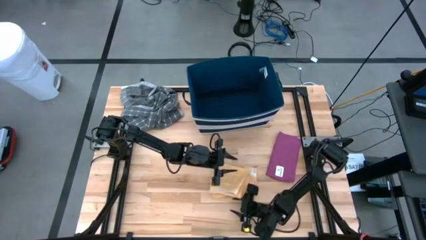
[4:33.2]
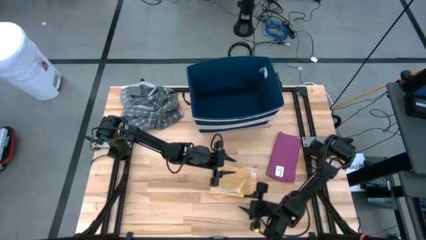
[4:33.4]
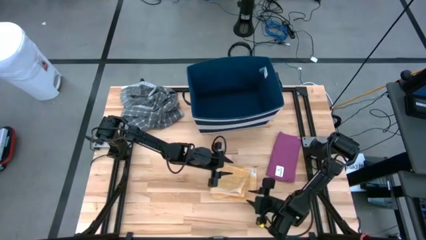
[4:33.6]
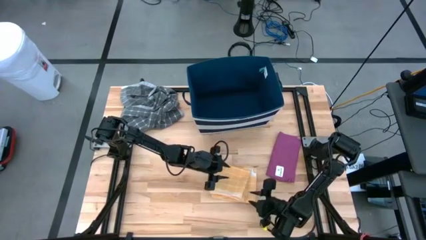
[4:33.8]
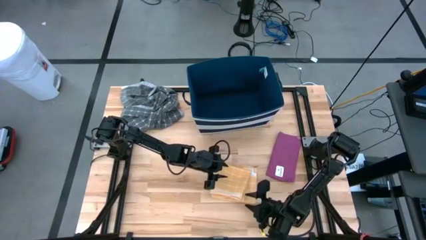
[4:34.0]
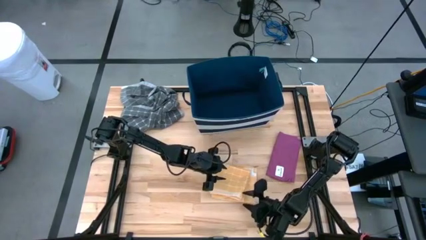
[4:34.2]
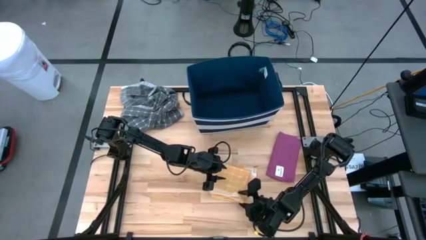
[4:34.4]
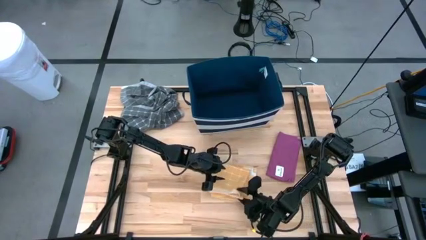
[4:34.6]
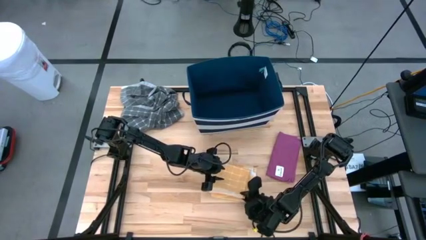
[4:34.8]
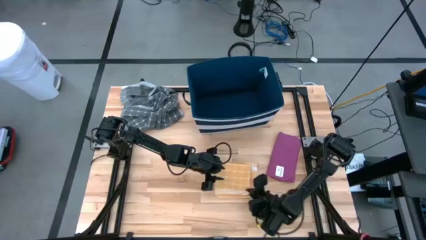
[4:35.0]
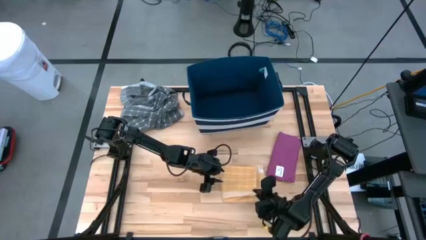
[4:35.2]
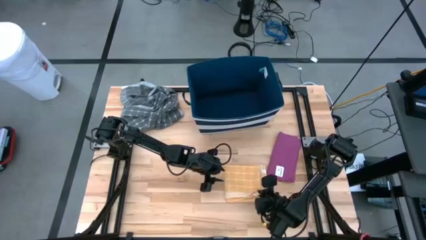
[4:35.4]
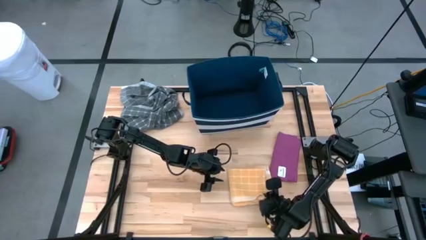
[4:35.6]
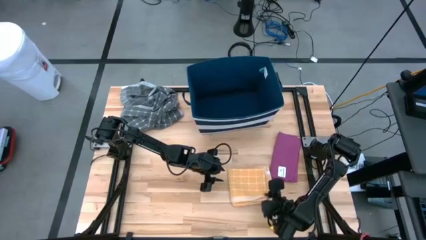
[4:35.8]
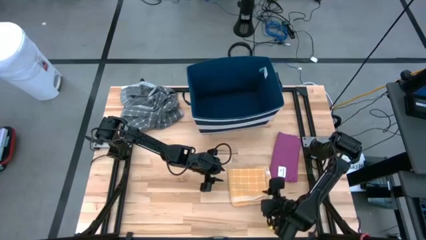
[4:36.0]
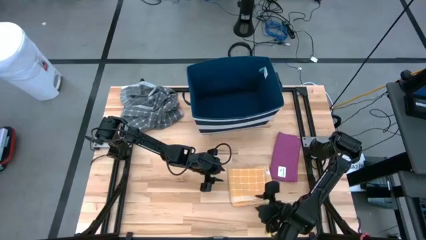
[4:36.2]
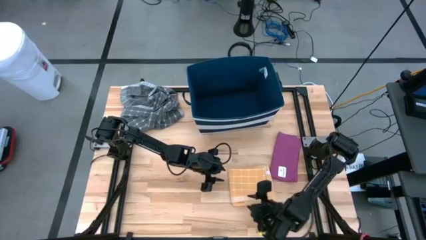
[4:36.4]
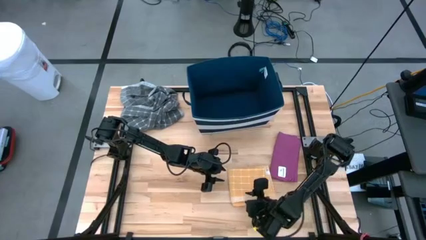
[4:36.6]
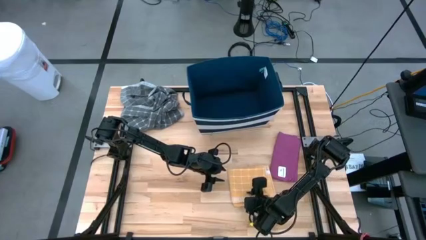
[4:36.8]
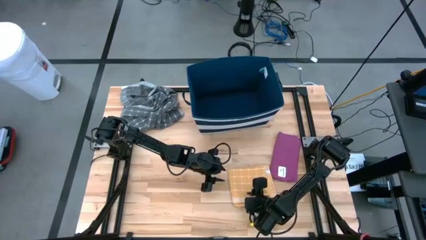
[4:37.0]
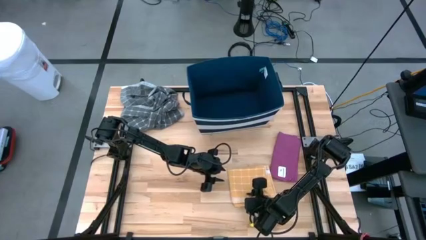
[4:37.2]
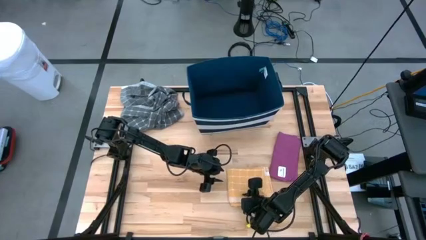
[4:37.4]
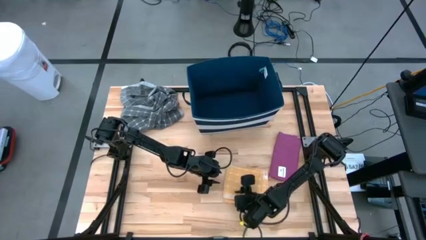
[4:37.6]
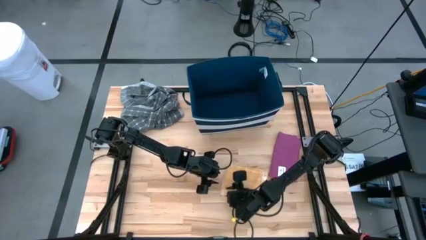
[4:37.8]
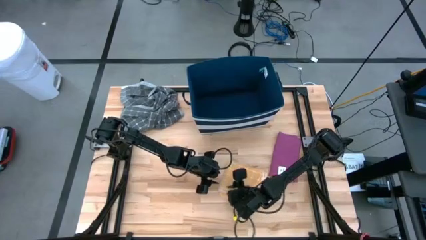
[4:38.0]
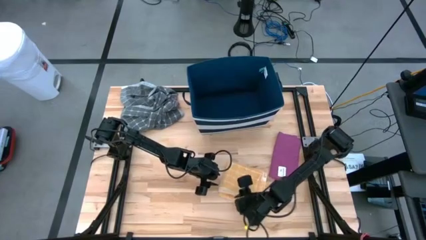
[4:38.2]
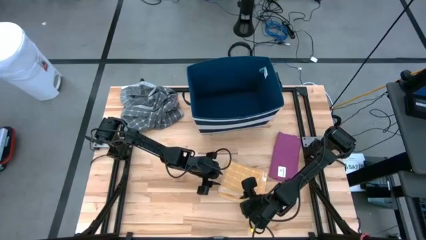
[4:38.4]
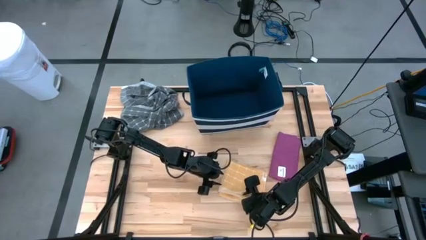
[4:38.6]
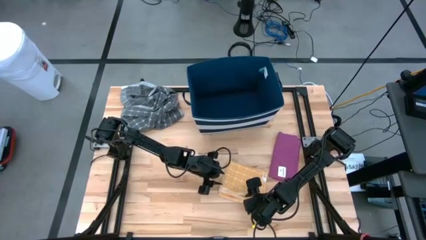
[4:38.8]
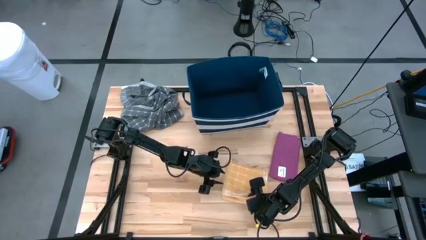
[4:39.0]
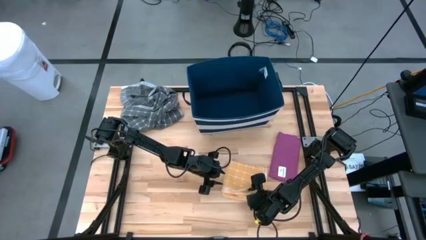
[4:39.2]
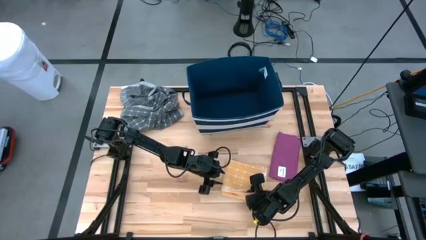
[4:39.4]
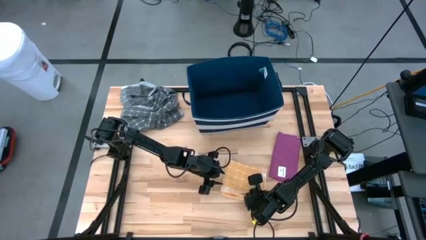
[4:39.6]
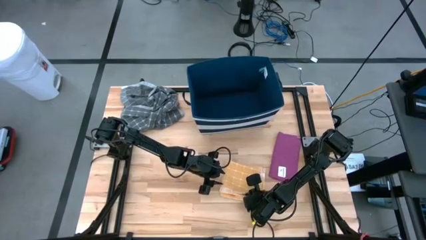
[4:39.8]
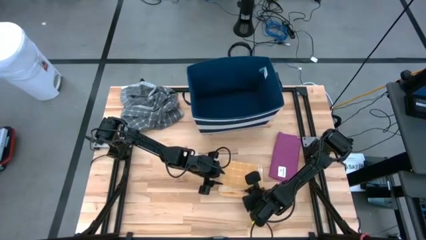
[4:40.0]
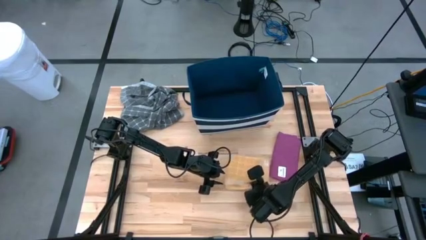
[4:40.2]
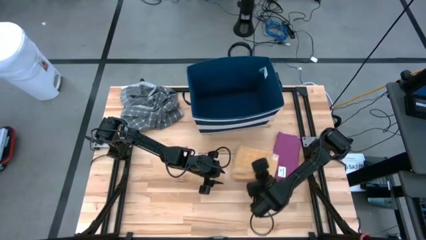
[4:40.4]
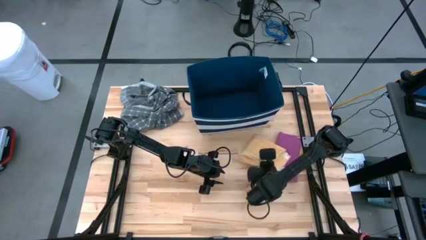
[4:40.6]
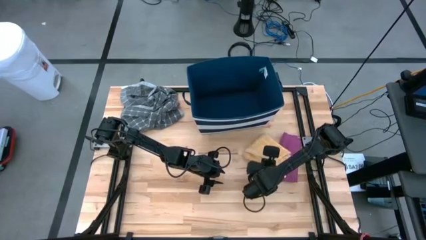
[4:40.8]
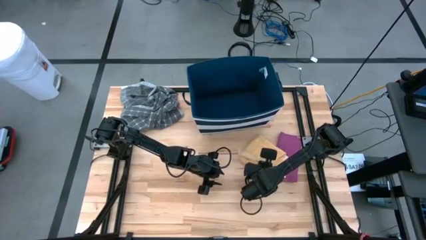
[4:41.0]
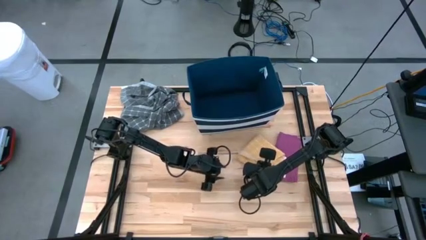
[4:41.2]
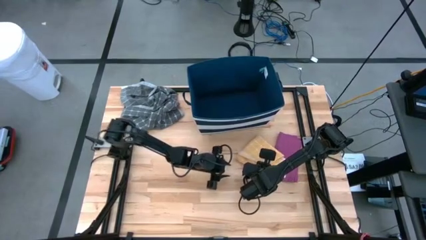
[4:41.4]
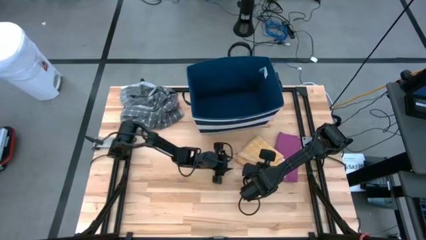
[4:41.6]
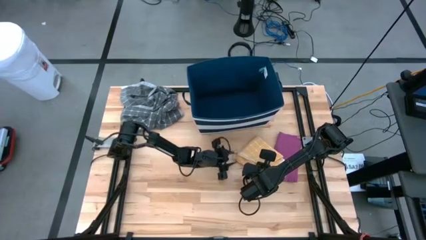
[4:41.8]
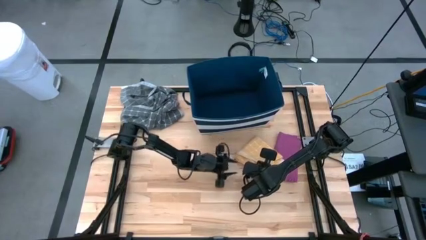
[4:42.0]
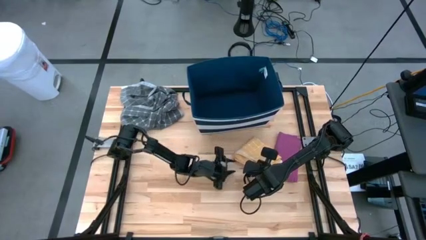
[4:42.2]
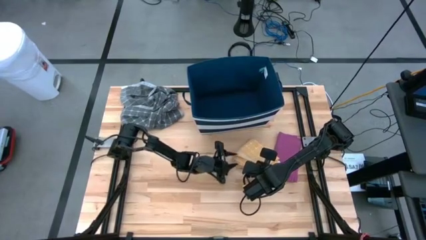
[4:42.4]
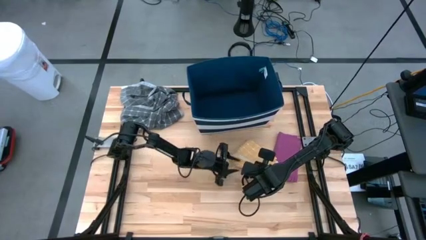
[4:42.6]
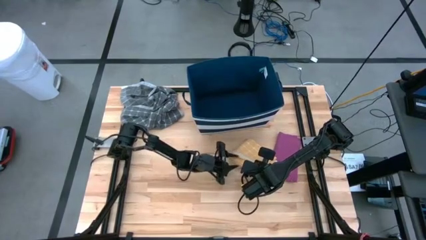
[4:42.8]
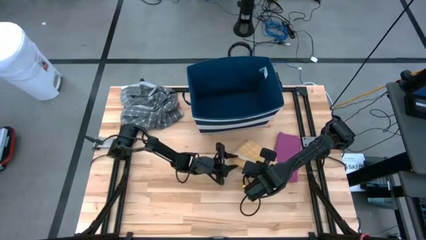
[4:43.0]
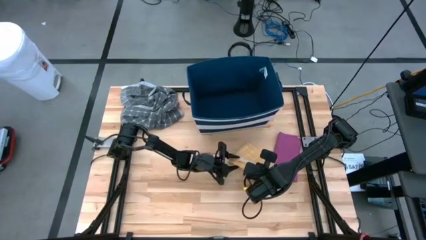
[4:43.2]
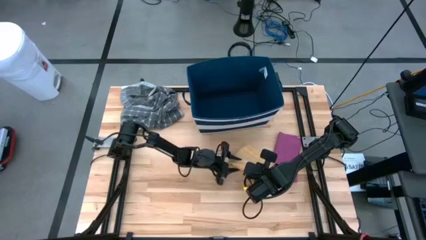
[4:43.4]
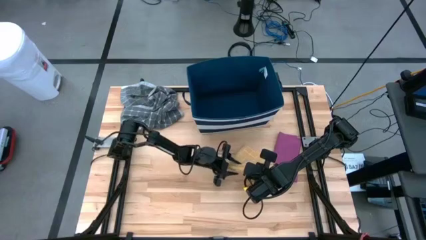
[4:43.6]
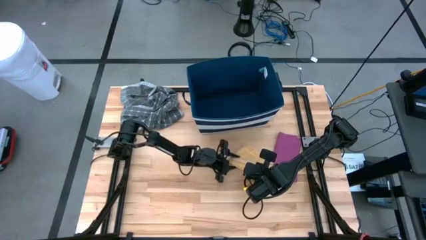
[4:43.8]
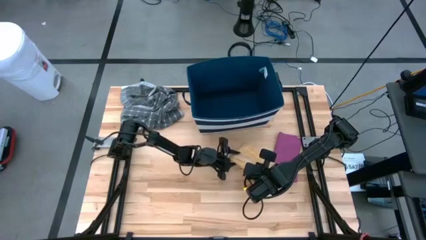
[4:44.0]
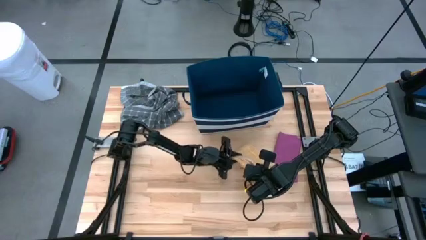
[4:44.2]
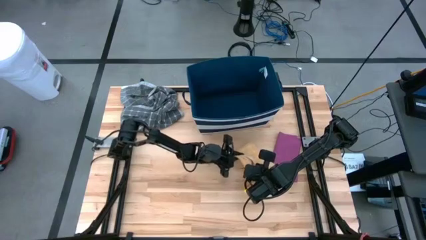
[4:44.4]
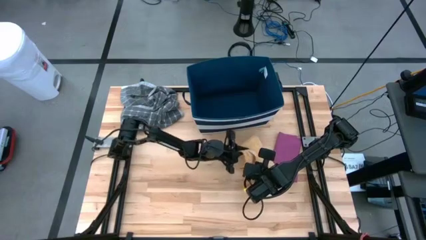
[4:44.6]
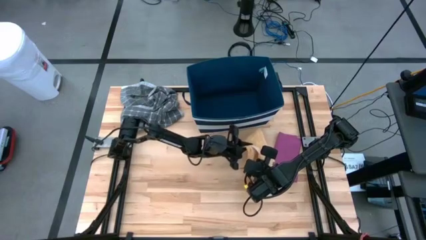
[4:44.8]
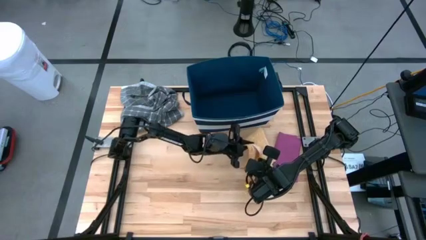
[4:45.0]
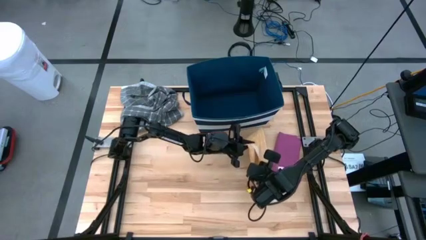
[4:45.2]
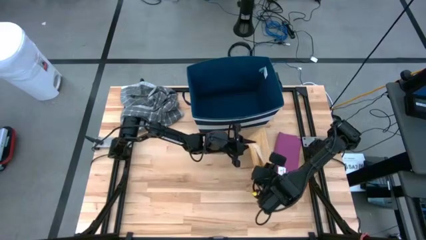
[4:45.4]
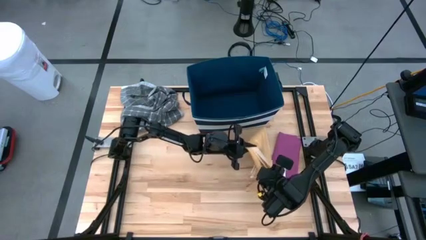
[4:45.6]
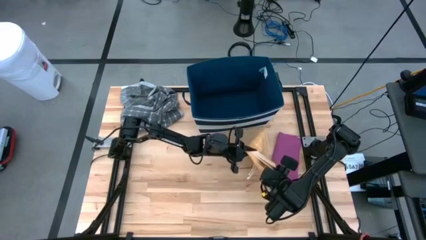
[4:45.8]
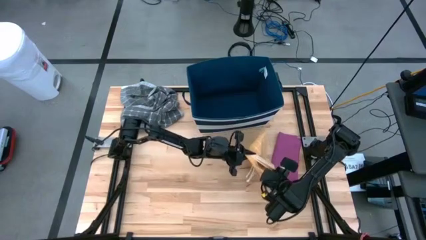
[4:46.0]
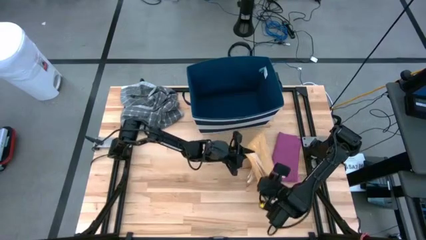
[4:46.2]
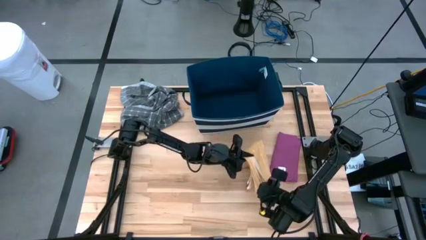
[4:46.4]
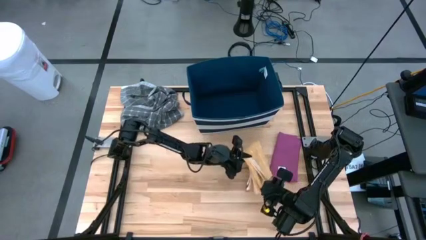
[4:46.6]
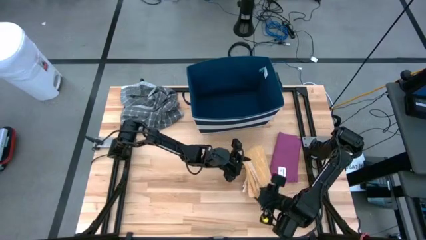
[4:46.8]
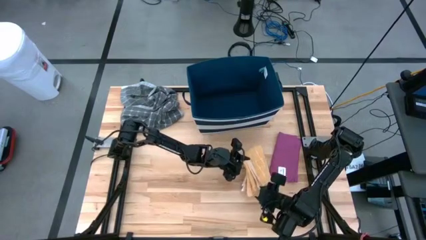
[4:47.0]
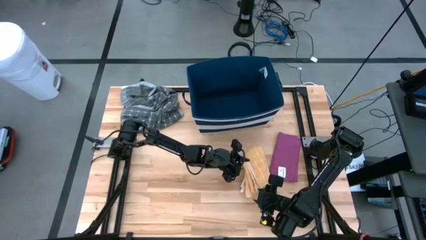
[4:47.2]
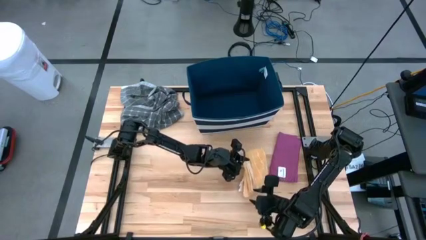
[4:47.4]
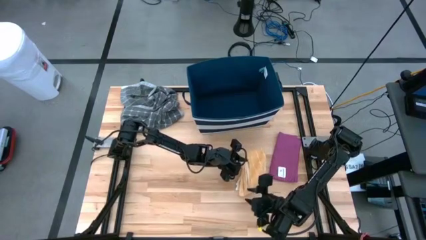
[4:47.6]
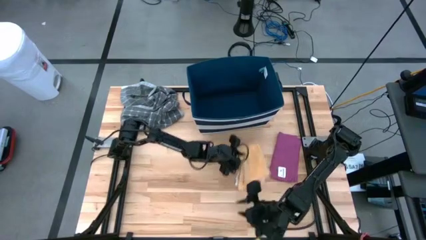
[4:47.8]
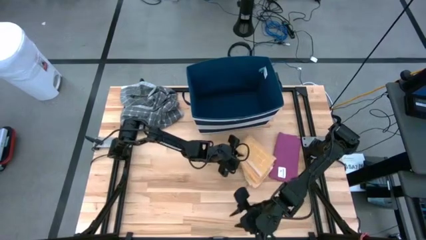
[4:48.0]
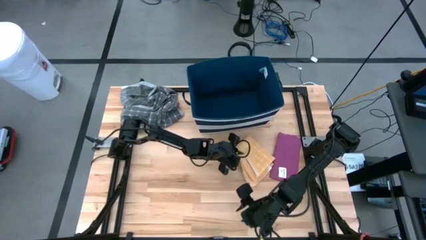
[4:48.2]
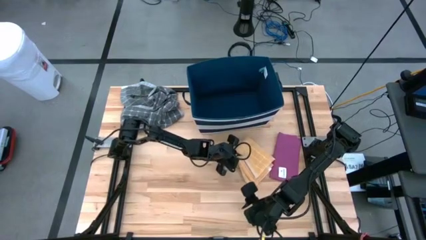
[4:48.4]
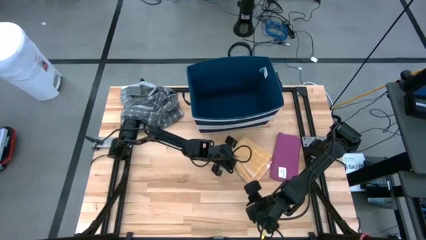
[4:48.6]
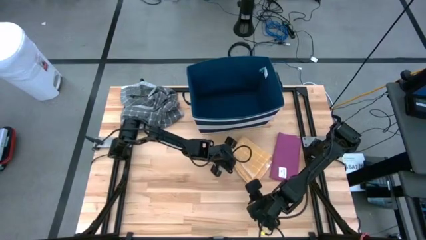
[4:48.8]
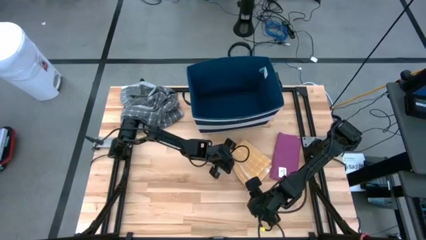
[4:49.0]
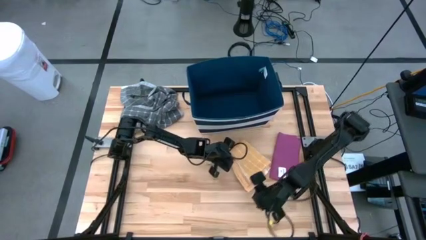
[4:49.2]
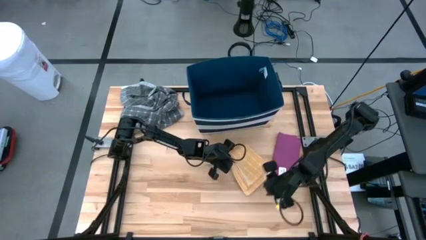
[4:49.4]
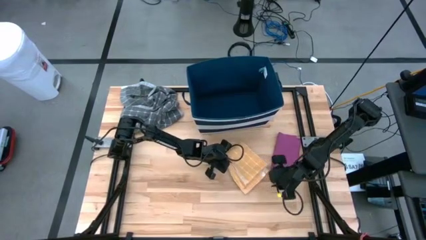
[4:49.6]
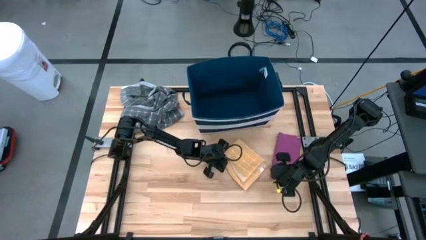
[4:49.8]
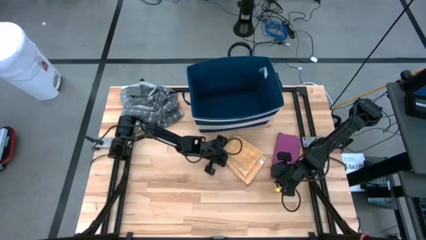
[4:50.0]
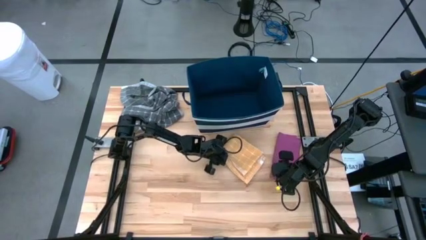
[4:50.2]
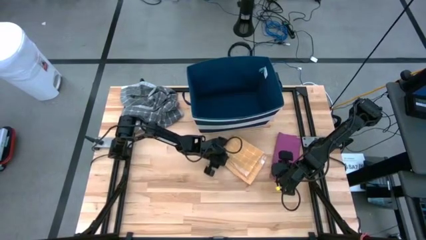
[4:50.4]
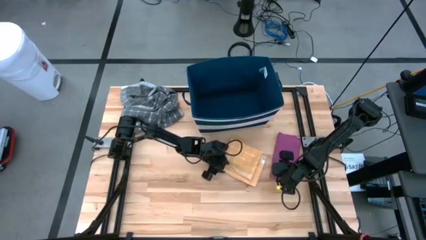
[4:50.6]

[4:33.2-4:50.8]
Task: Fold towel
Fold the yellow towel
